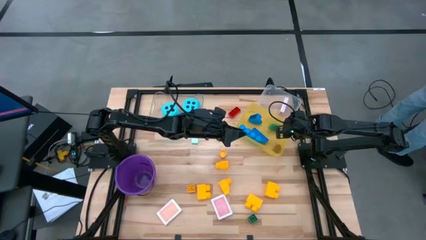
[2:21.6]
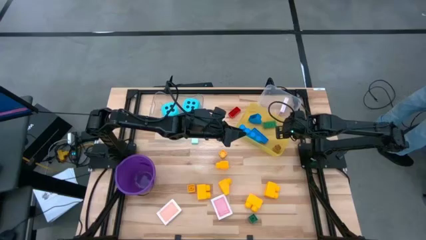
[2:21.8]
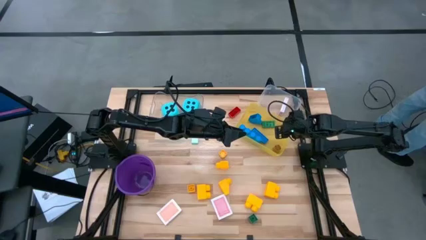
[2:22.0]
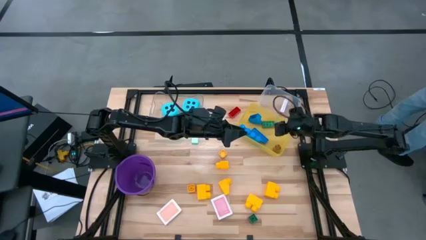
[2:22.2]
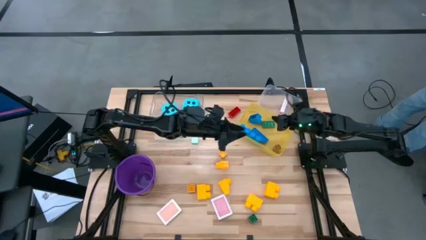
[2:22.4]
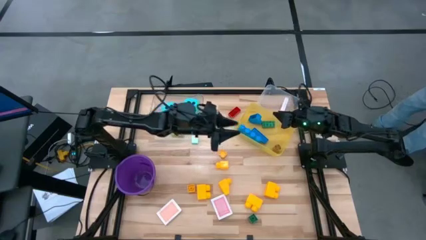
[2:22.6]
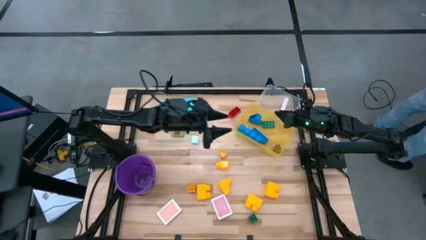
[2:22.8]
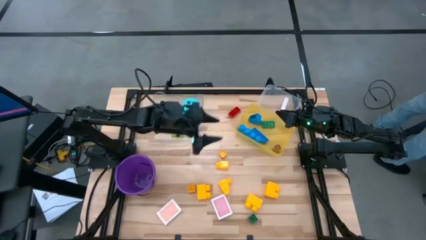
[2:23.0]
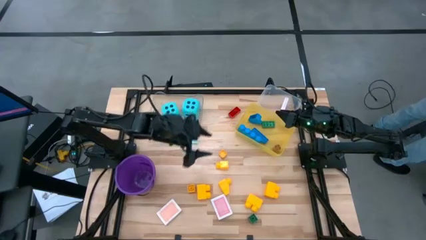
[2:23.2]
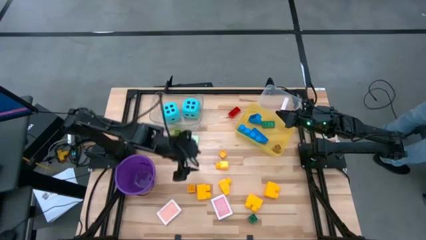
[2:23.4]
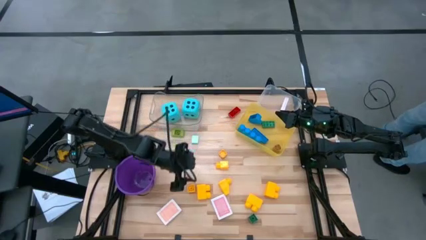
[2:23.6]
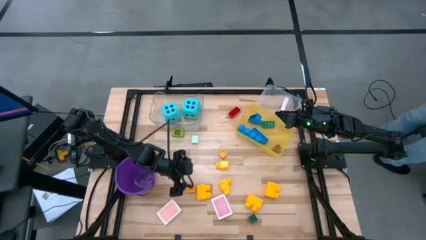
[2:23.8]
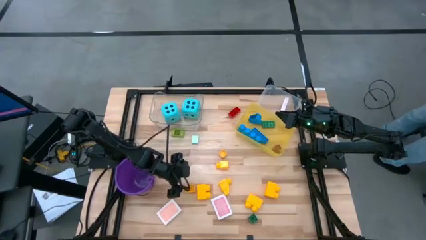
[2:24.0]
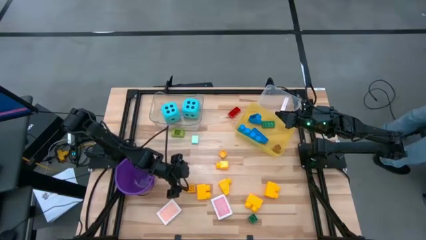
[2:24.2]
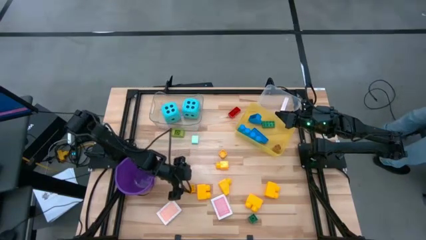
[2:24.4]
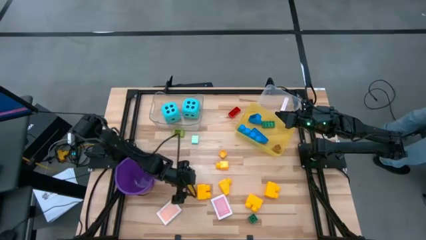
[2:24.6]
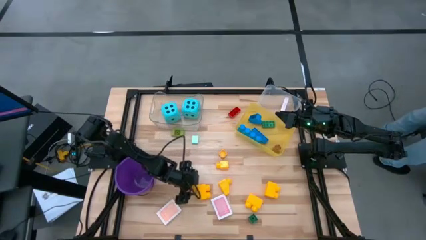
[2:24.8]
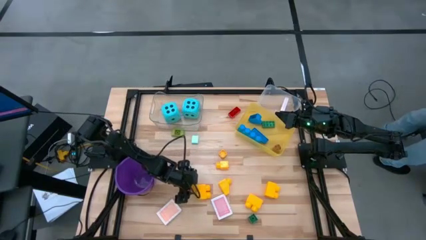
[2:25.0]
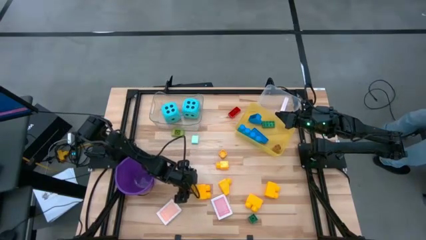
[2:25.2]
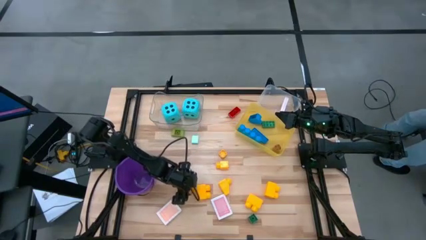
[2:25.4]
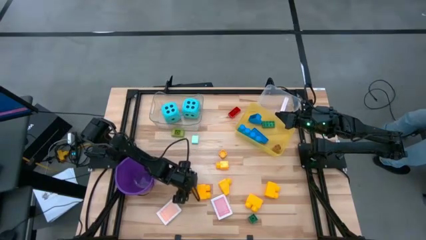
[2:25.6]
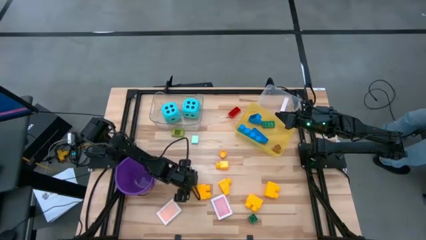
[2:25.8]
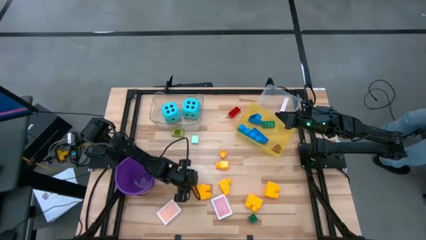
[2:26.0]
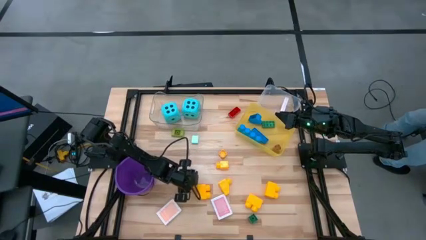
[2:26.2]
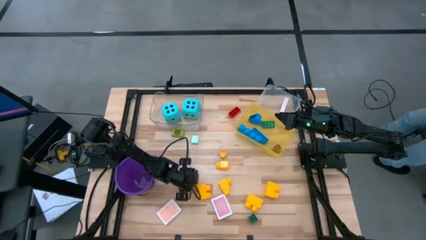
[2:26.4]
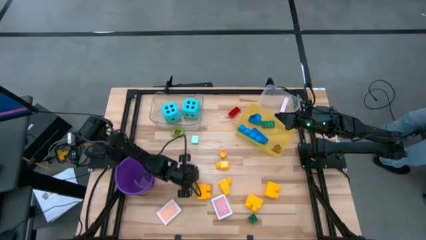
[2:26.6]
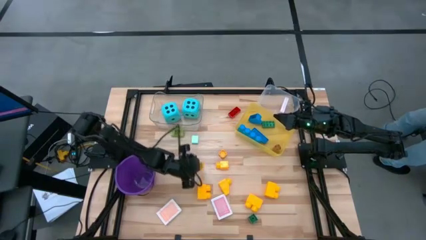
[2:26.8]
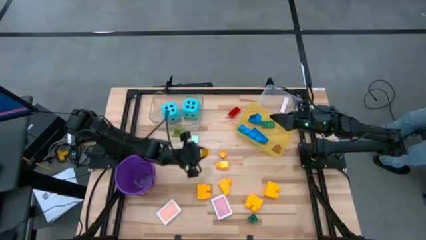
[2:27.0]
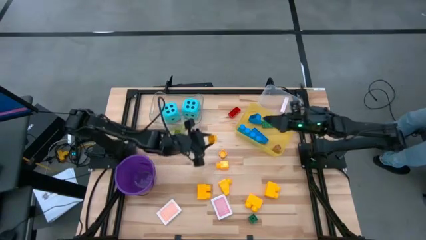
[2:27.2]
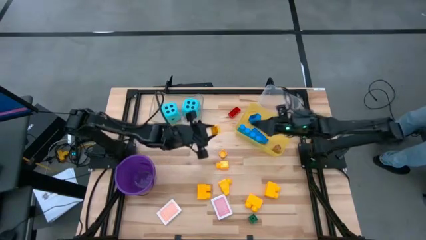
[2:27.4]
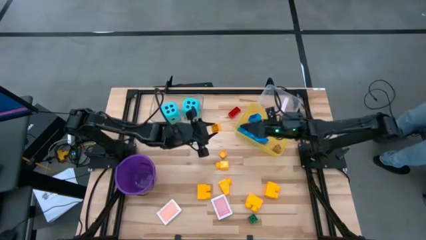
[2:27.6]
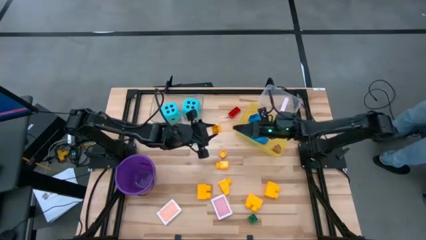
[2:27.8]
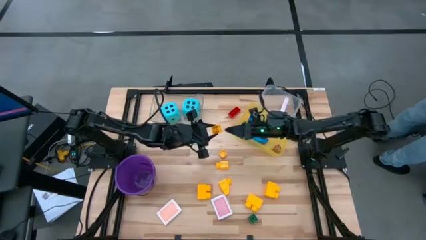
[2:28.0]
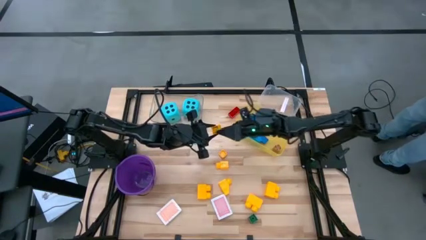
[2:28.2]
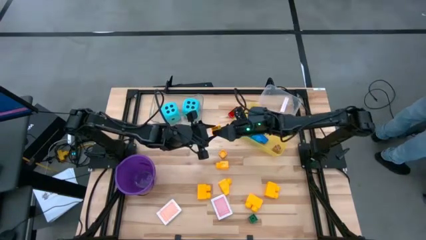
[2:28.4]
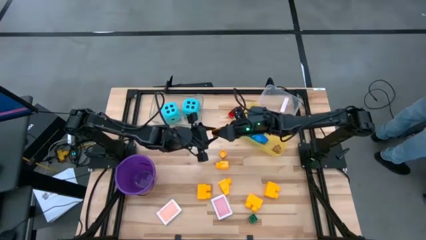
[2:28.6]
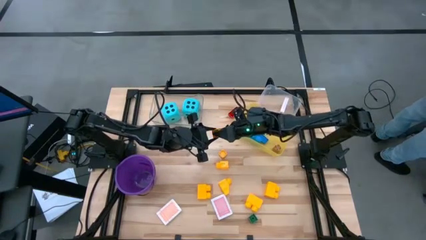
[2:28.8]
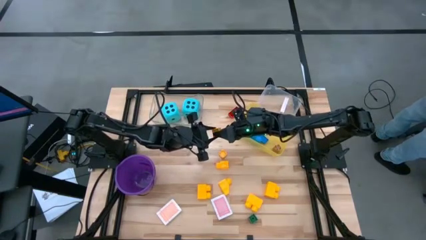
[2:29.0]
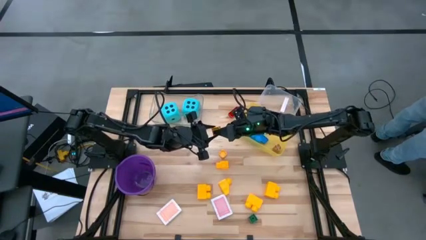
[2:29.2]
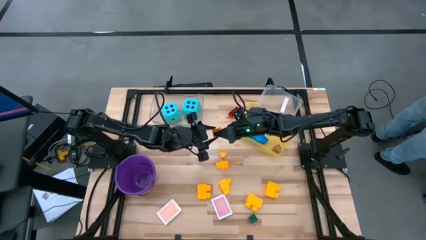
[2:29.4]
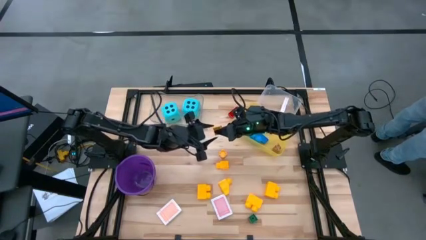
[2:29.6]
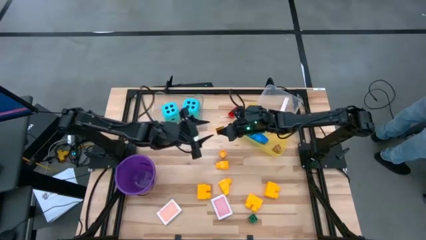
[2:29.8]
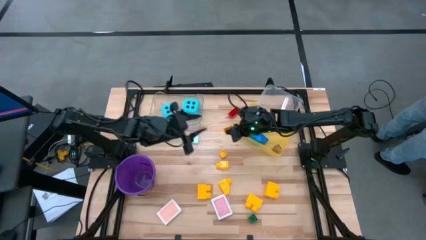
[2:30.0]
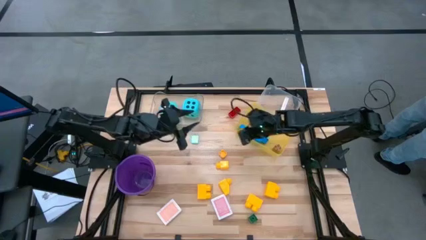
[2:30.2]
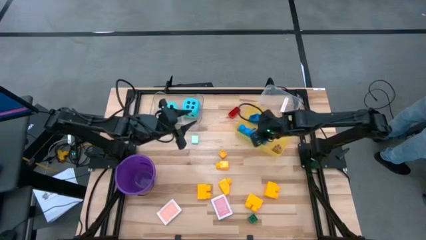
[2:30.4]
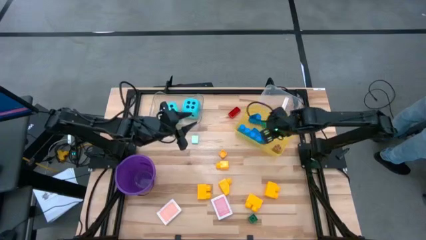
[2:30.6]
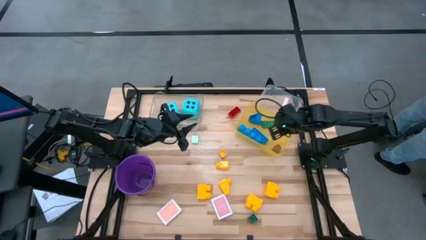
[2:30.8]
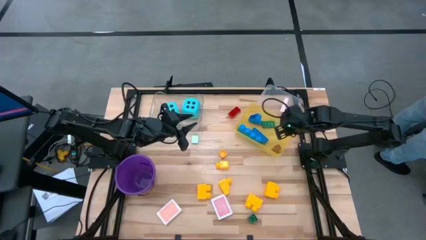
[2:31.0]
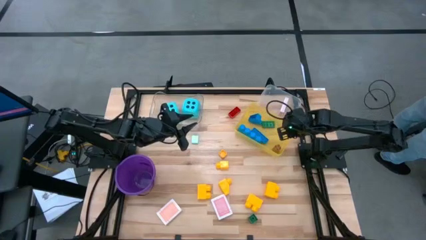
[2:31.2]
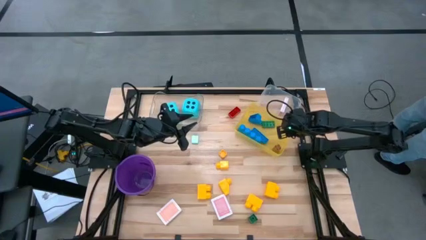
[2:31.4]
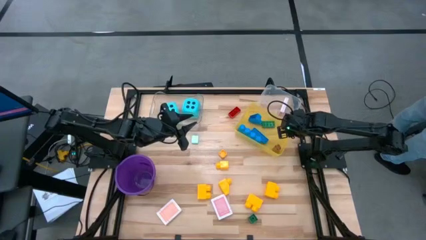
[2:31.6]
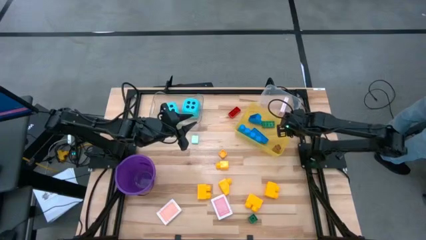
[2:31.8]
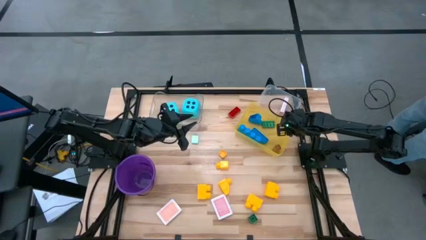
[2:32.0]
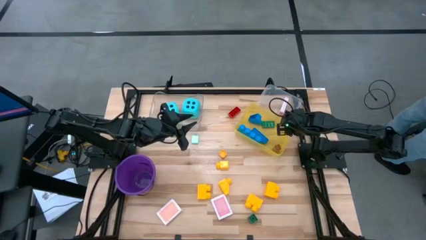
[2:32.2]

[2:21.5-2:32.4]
Task: Pick & Place Toys
Put the yellow game piece into the yellow bin
